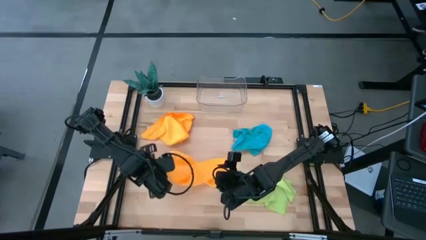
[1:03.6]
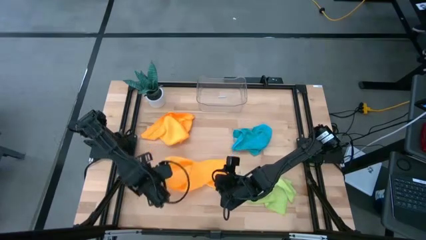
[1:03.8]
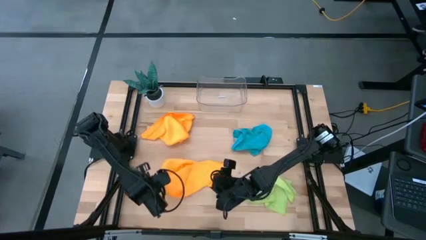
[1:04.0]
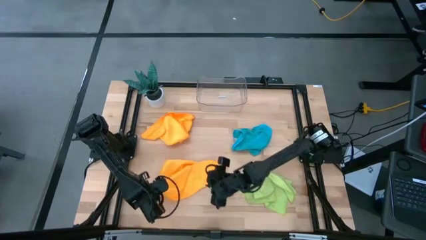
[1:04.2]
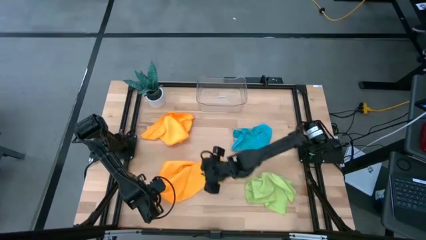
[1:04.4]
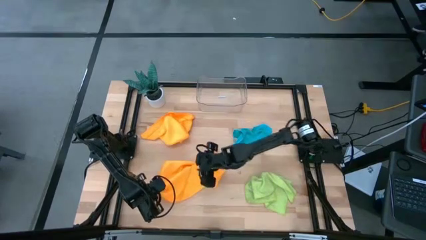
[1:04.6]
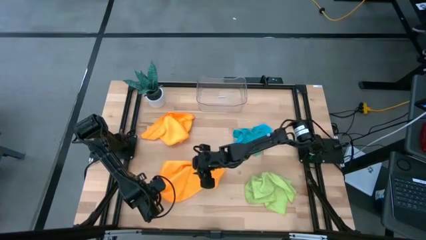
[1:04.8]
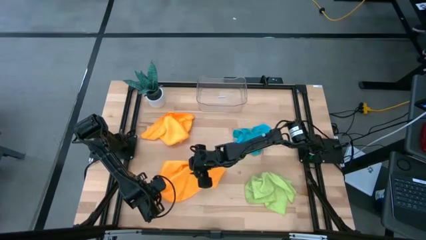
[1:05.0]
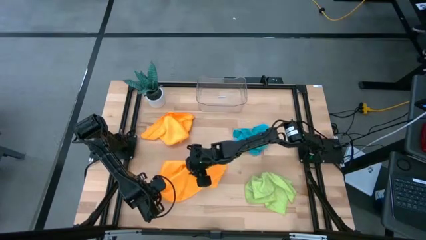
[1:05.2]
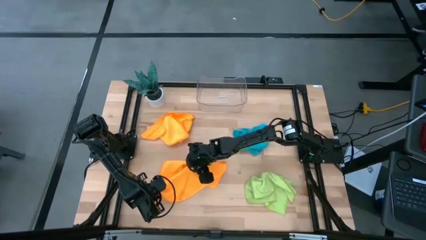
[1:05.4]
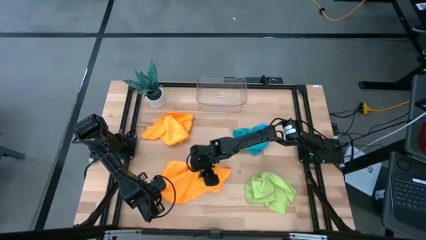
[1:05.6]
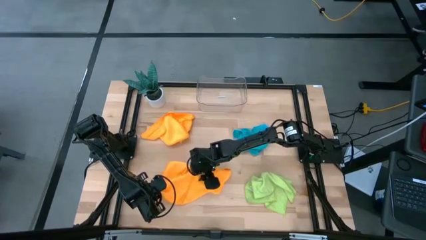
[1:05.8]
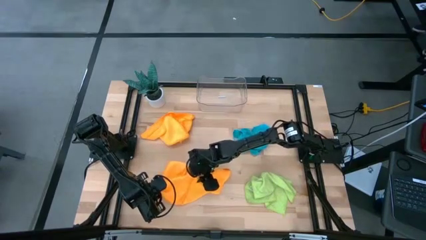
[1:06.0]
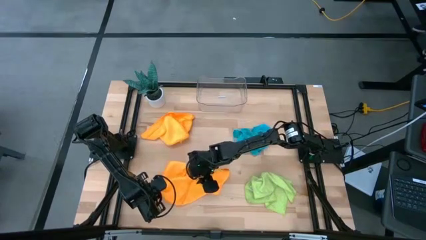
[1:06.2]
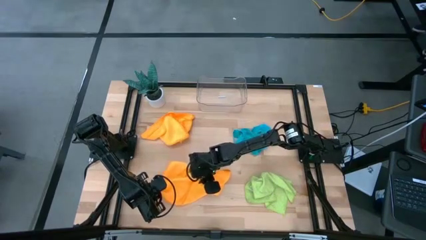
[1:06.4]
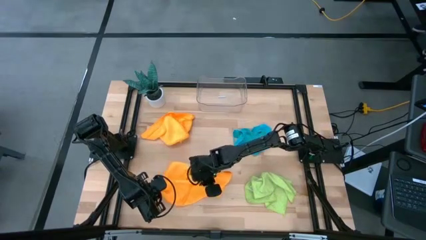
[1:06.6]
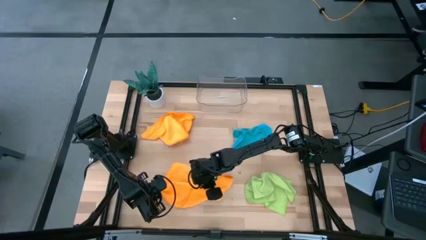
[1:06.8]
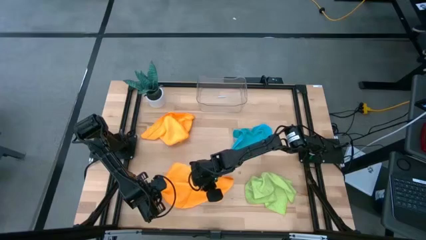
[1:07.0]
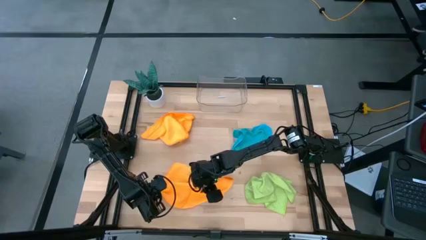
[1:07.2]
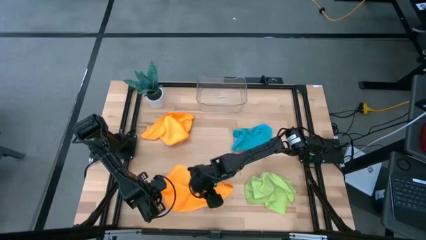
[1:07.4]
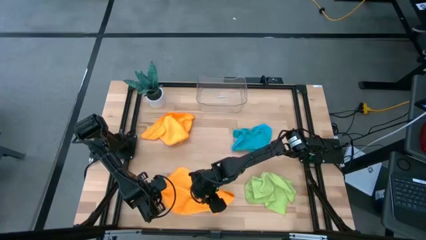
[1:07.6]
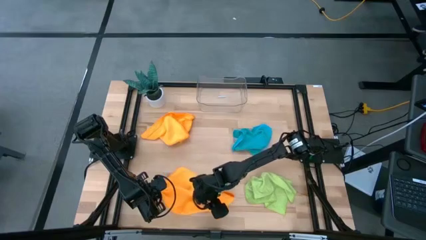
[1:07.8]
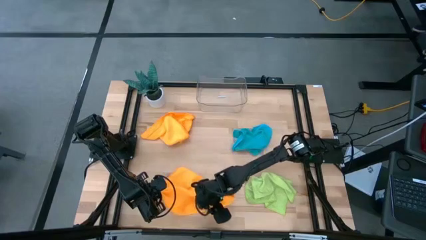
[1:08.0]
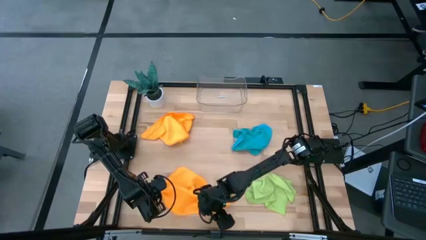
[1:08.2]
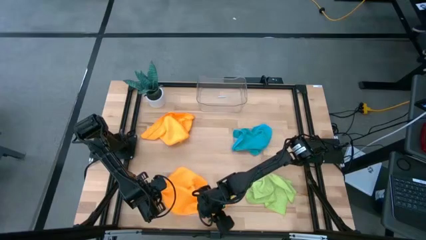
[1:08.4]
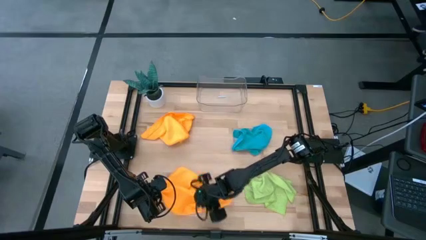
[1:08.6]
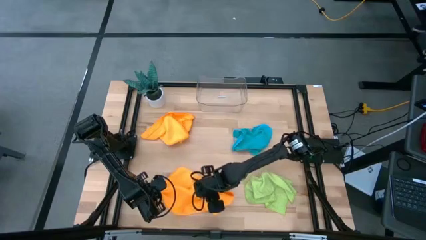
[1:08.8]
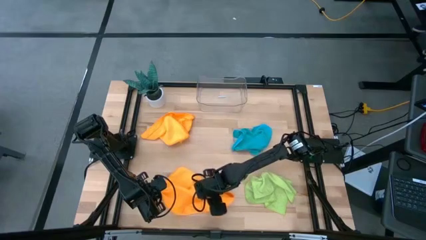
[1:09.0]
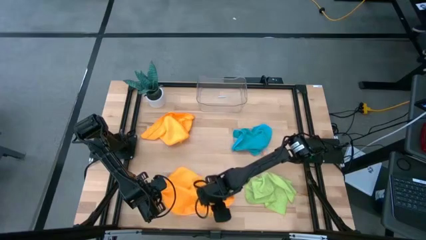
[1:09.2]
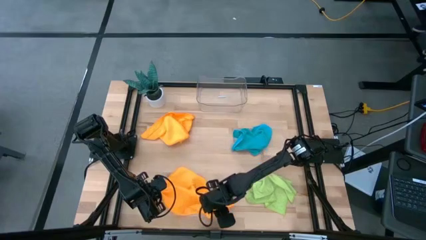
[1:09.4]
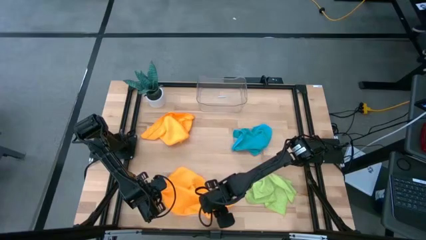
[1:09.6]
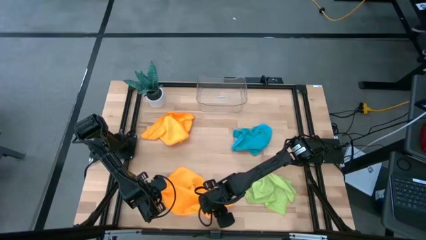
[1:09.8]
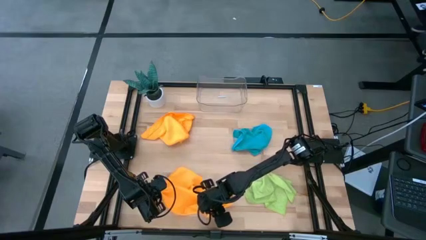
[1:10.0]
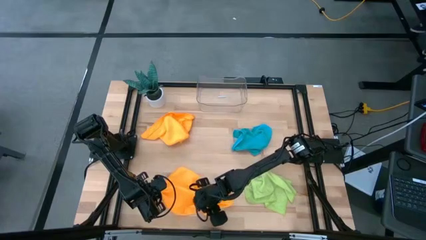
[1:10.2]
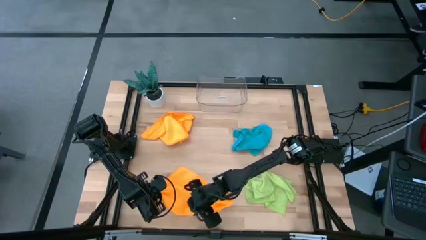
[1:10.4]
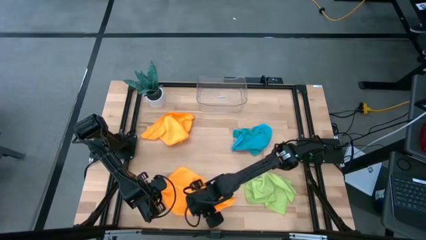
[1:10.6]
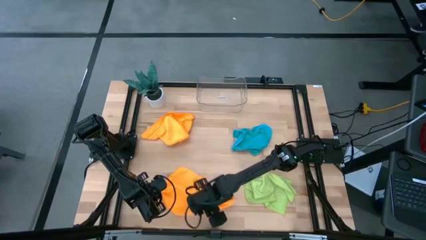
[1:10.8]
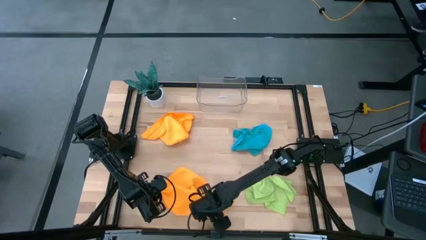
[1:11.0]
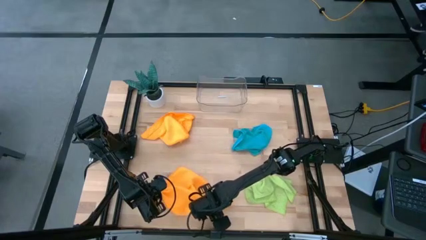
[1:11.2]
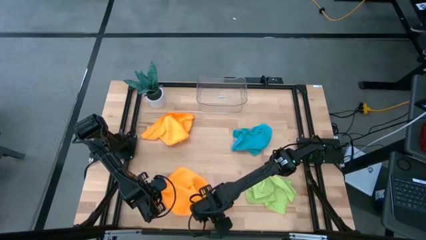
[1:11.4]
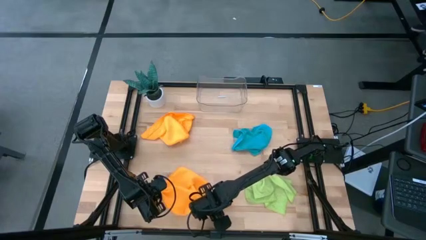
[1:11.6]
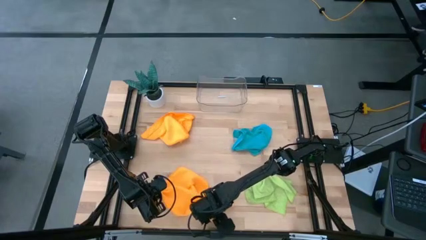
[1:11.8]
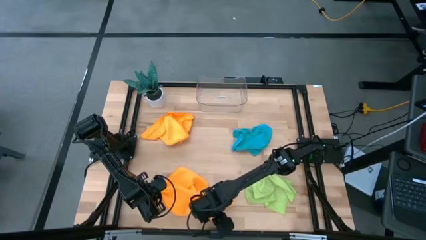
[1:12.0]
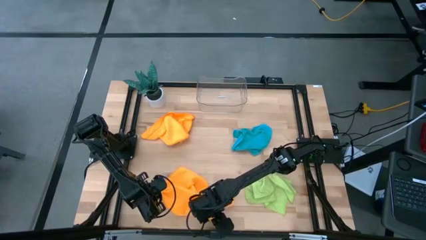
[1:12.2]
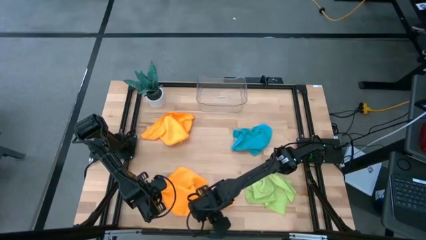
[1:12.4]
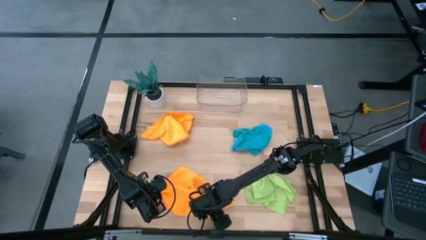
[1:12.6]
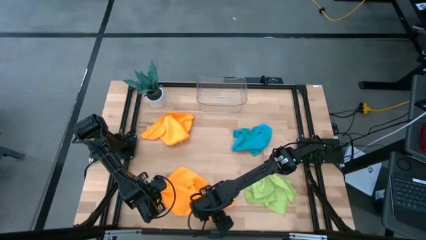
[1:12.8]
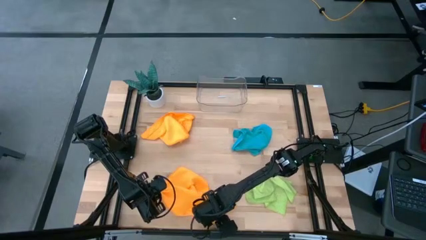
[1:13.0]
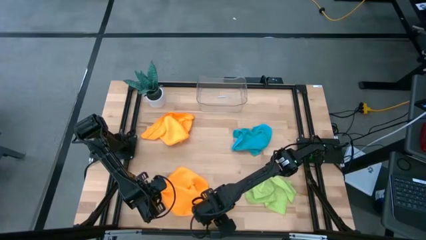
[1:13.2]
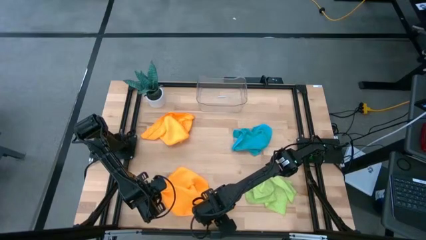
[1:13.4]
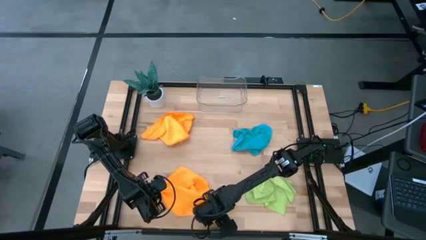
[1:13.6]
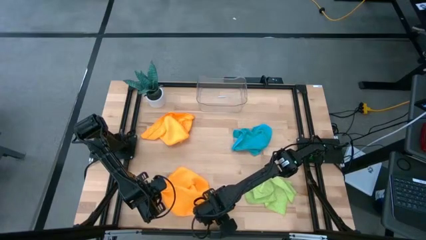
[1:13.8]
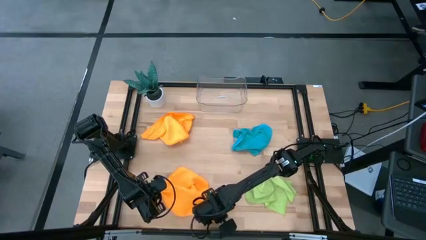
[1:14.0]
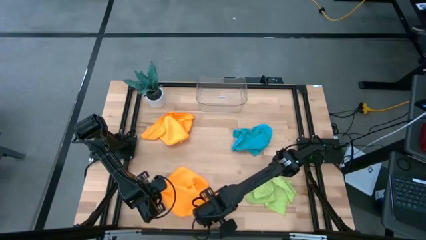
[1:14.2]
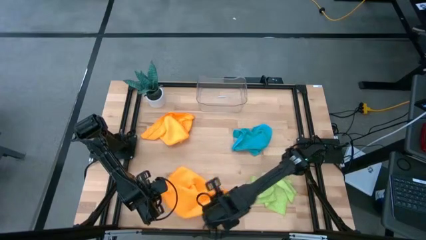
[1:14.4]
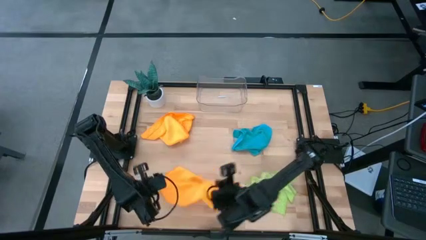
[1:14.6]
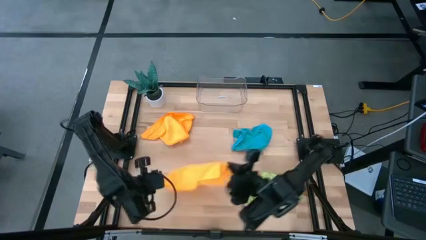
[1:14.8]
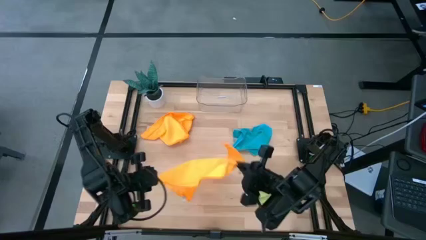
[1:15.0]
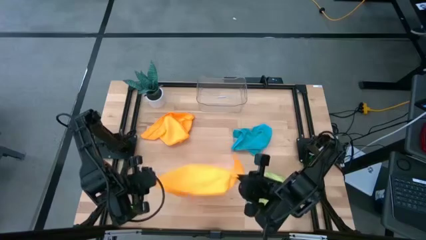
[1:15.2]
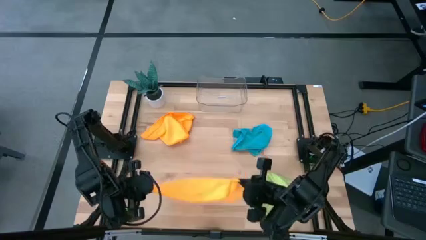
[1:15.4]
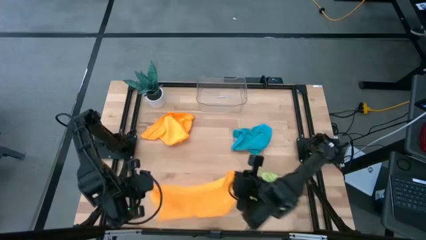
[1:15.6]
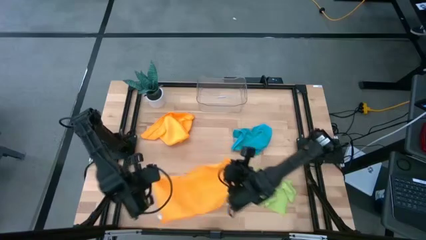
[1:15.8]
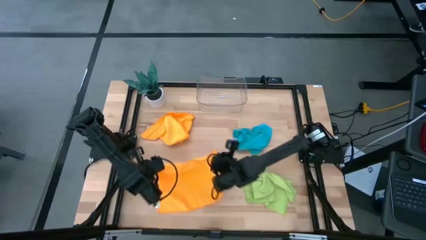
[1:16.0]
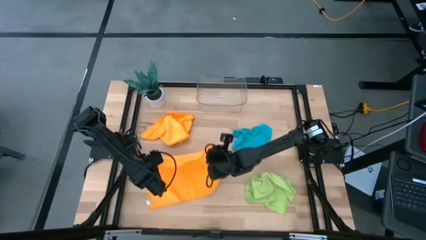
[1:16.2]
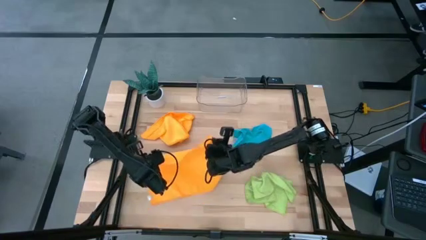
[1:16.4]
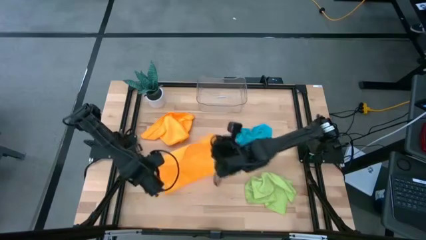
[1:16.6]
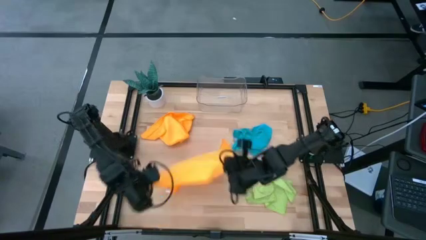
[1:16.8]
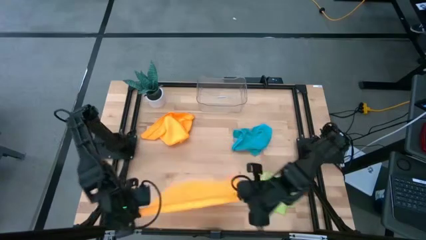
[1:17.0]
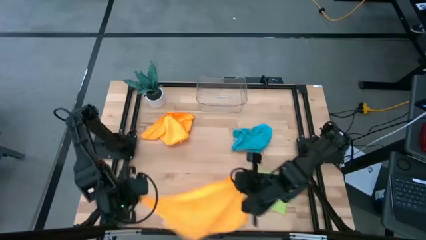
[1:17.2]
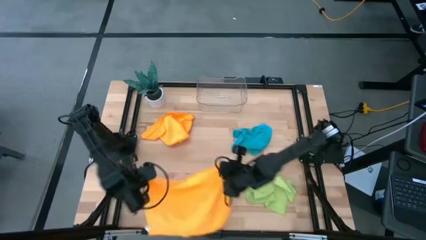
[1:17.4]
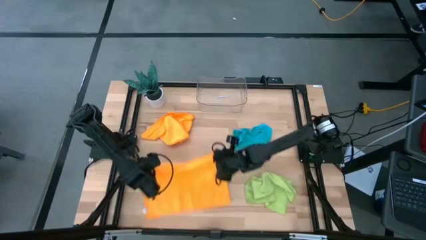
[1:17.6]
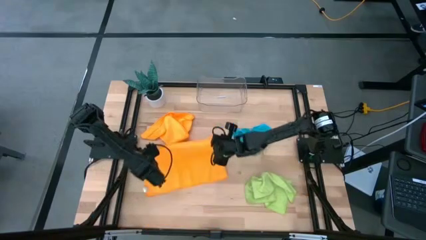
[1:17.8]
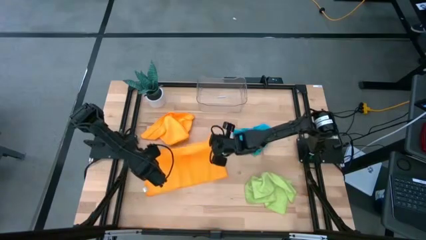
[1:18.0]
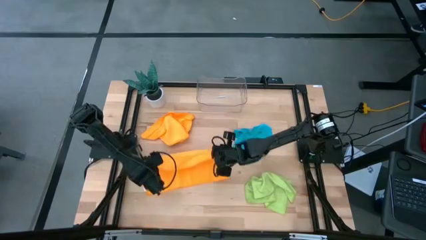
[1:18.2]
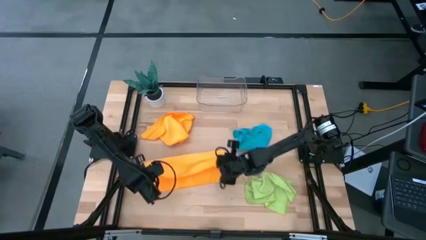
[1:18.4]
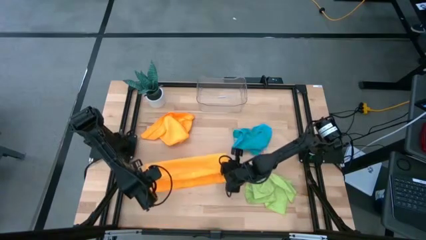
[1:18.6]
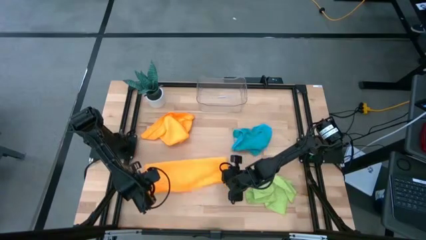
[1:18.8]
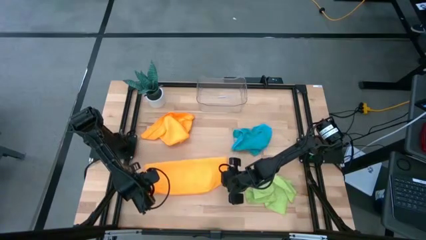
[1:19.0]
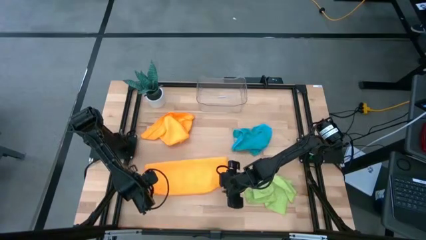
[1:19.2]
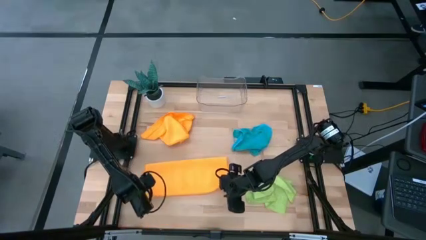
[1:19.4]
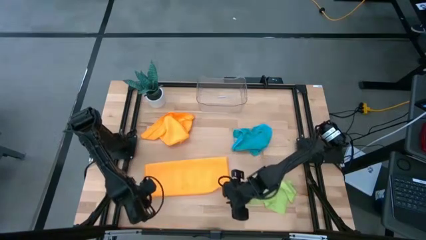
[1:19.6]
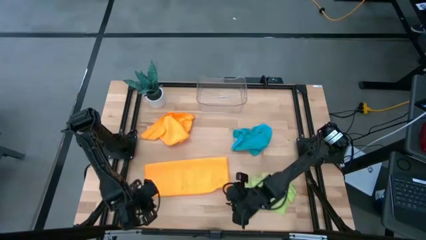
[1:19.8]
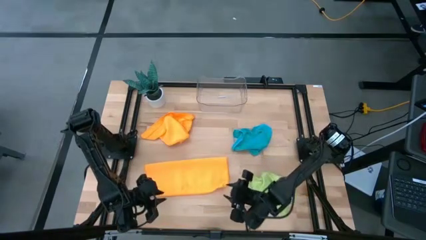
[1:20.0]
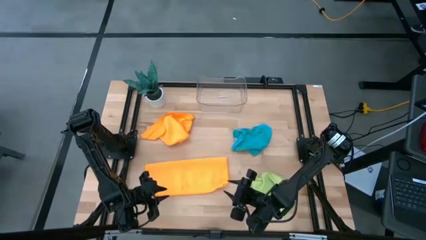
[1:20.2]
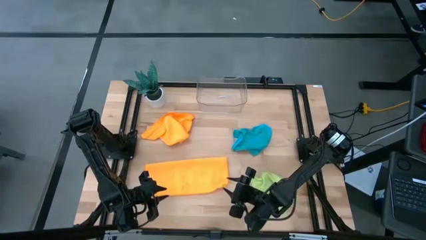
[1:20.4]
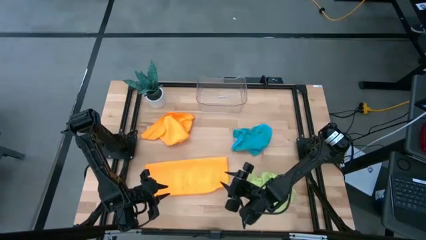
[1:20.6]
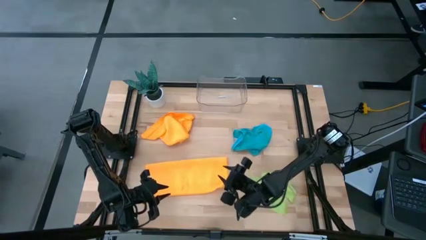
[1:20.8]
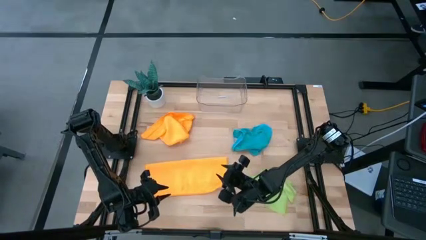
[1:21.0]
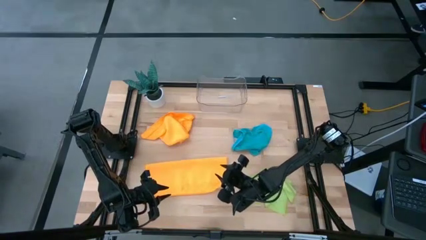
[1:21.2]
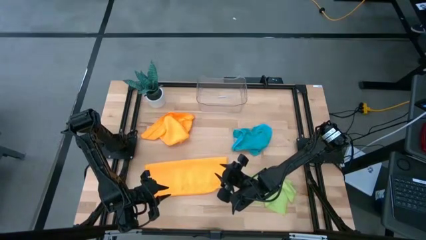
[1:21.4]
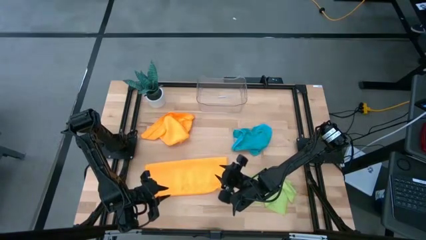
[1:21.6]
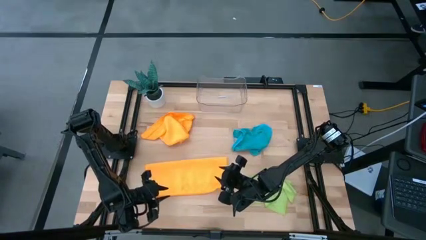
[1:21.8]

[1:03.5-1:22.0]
Task: Fold microfiber towels
Fold the bottom orange microfiber towel
